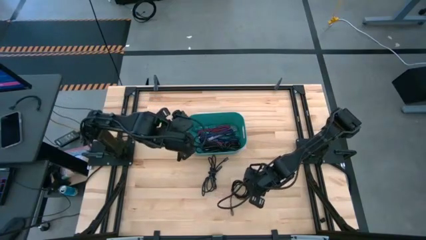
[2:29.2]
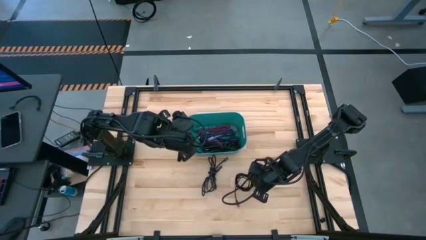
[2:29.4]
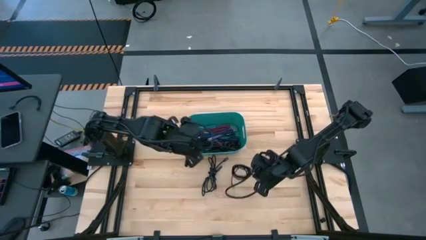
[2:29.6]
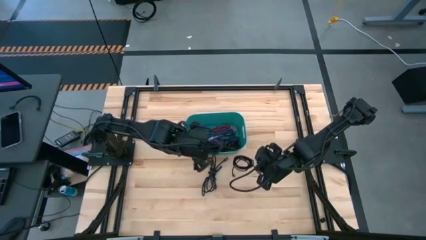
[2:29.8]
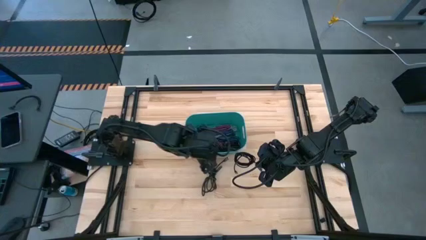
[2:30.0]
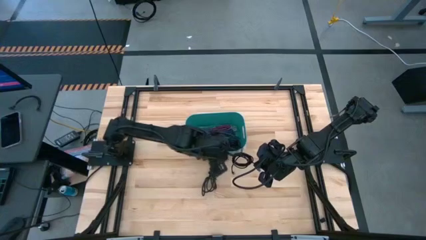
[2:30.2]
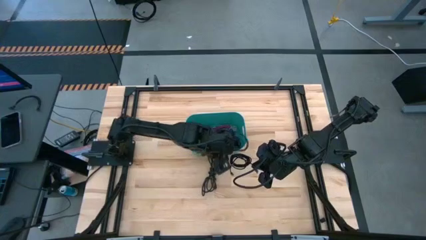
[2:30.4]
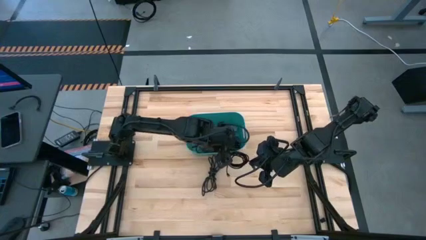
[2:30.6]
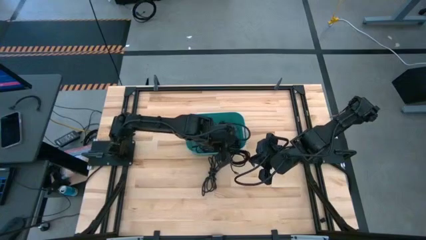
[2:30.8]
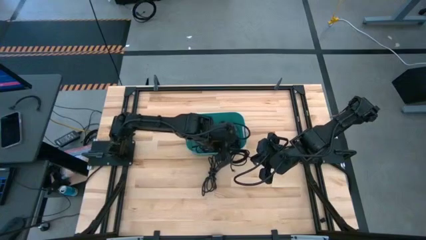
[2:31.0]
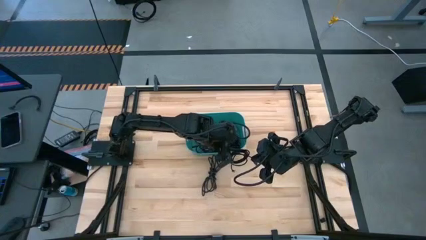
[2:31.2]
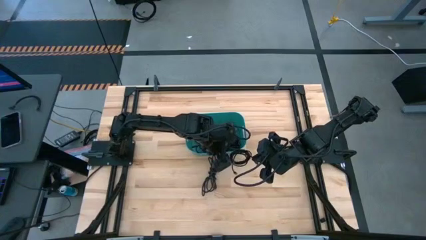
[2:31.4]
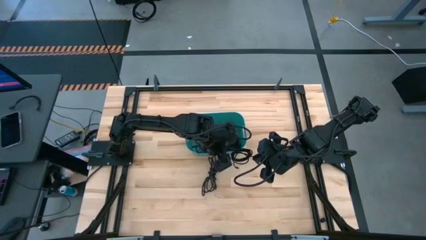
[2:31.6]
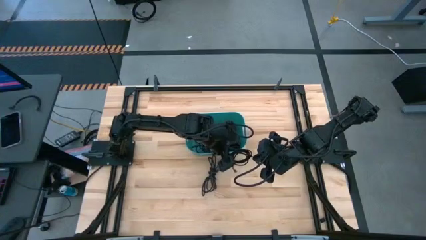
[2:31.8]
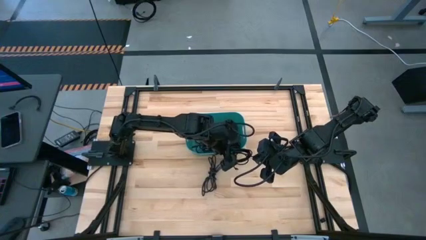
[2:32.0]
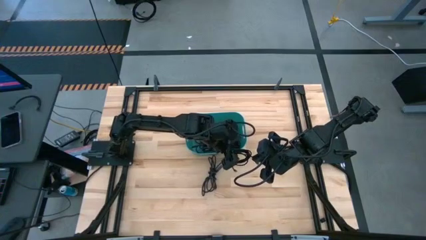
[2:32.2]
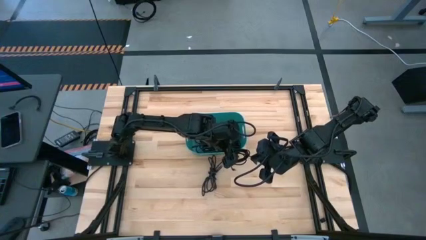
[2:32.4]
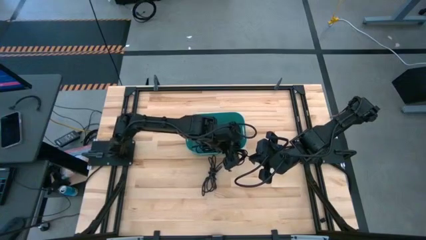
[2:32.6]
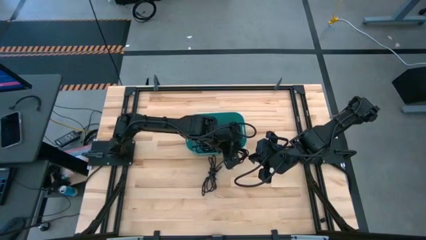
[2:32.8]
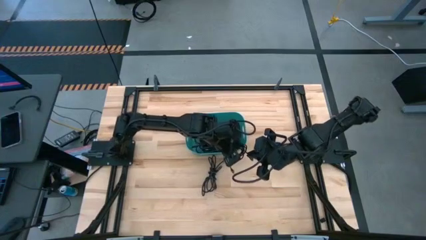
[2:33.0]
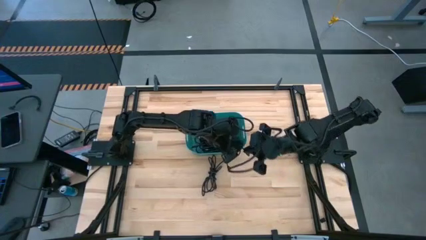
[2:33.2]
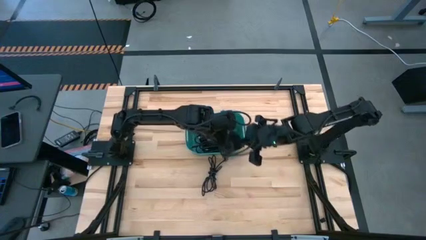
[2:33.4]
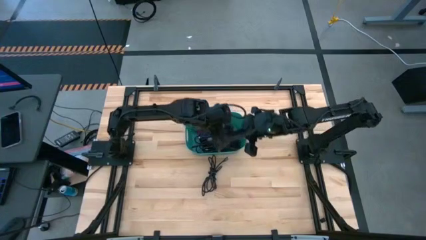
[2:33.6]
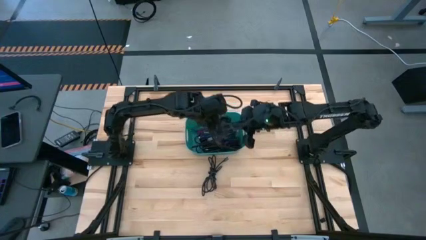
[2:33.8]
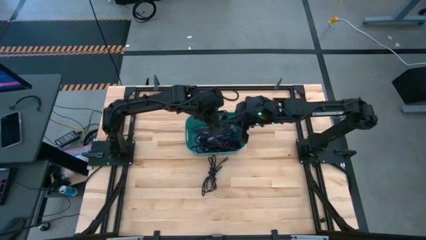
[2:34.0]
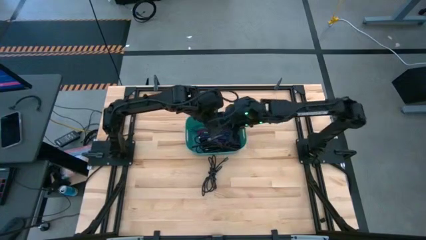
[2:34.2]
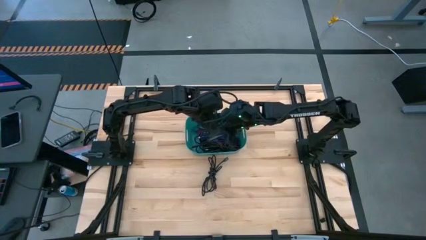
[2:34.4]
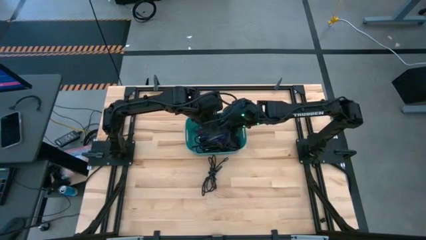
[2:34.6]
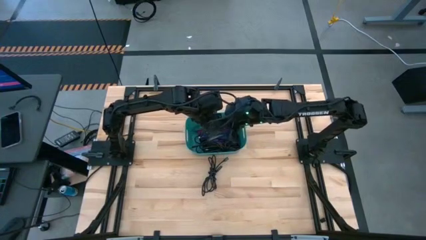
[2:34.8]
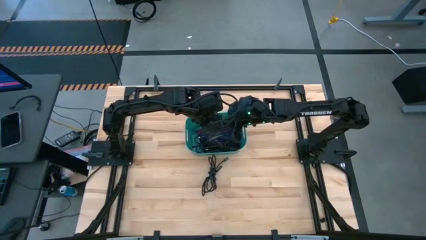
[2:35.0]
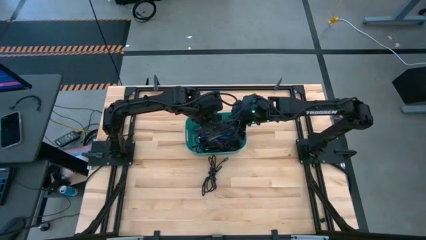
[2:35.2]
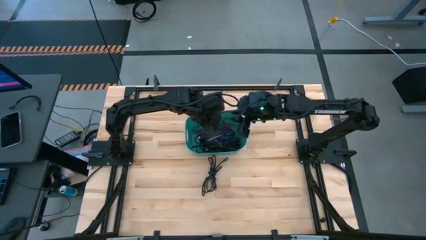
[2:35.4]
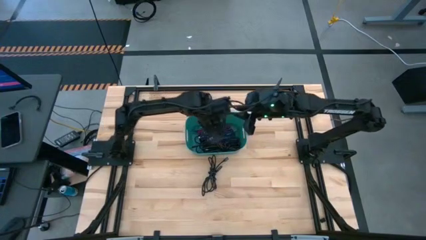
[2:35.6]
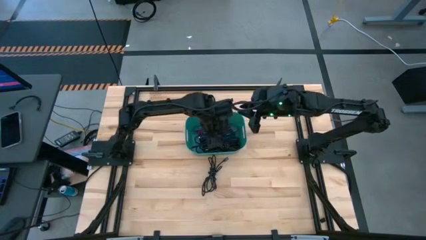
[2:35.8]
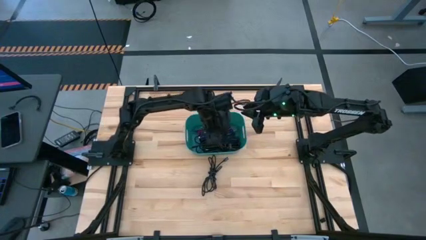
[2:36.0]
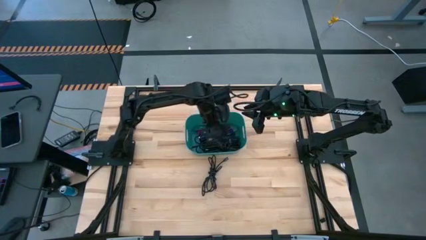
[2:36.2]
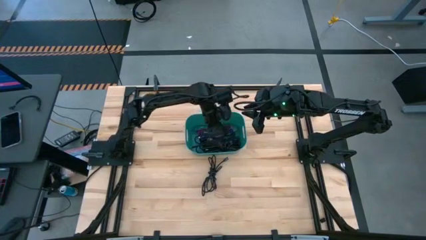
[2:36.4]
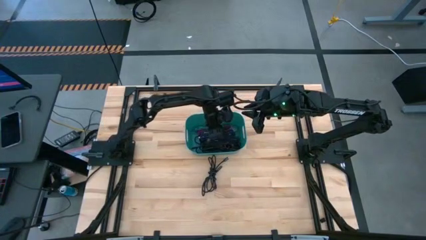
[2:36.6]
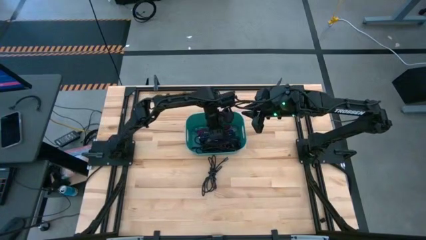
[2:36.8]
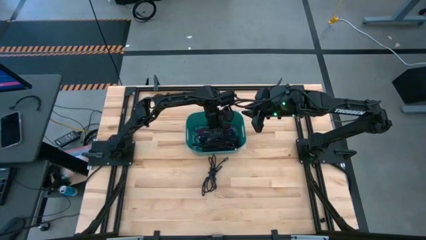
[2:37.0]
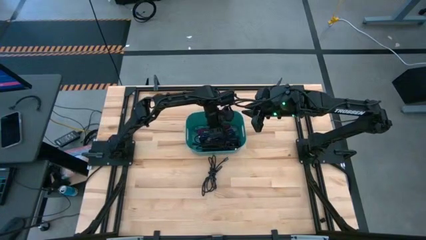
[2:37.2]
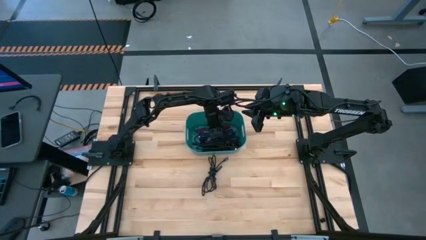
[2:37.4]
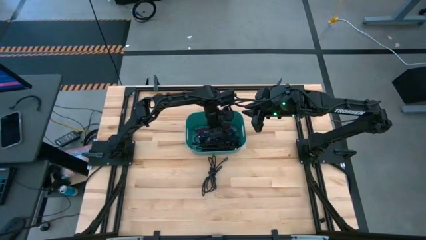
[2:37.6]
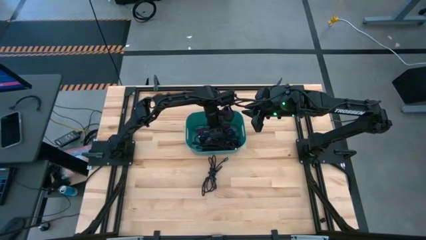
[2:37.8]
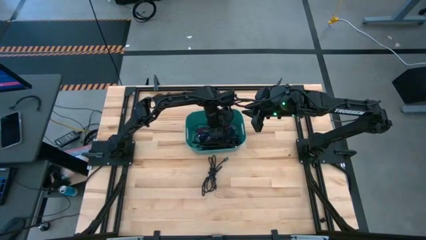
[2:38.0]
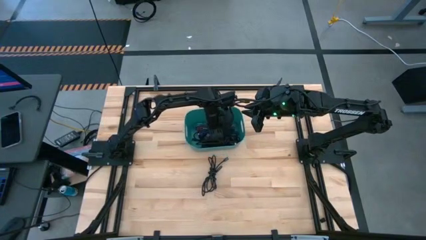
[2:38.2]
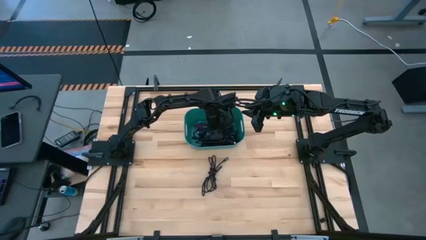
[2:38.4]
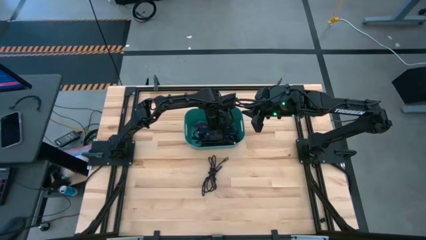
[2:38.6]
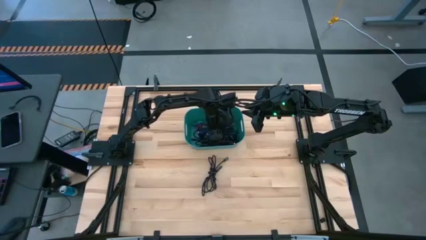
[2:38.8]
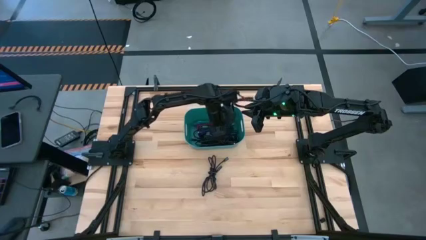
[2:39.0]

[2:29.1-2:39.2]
Task: Pick and place USB-C Cables
Put the bottom black charger cable into the light blue bin

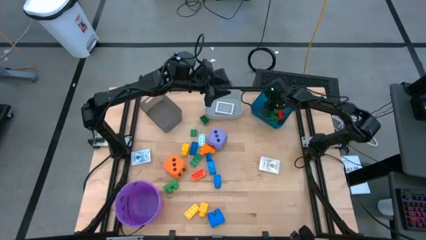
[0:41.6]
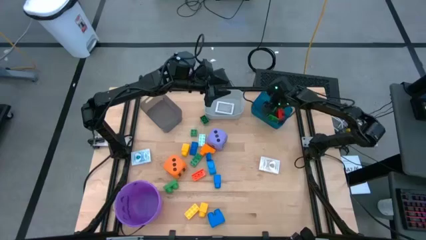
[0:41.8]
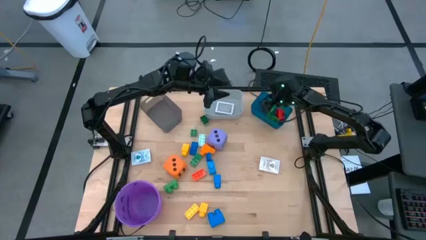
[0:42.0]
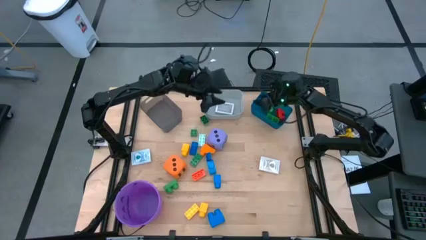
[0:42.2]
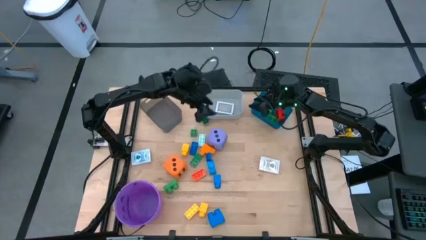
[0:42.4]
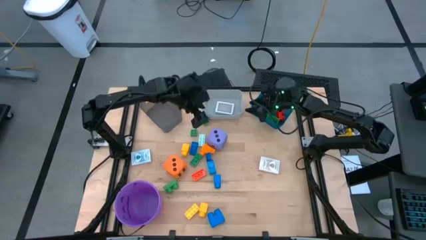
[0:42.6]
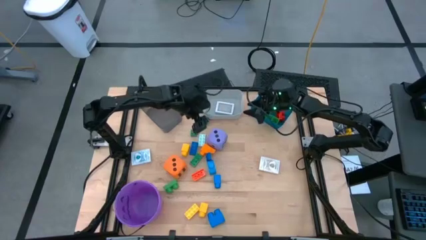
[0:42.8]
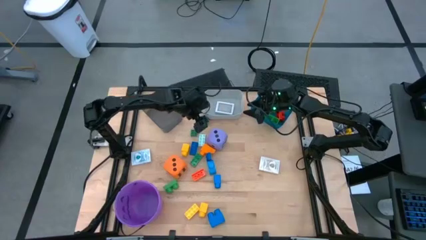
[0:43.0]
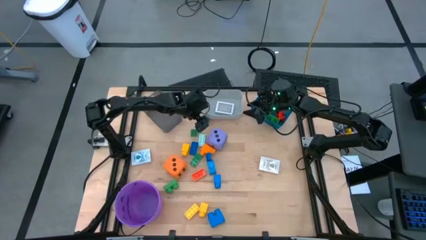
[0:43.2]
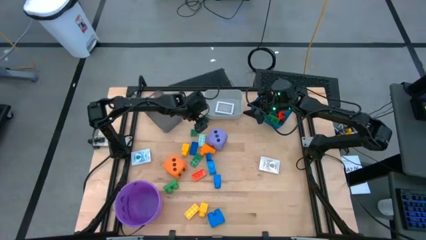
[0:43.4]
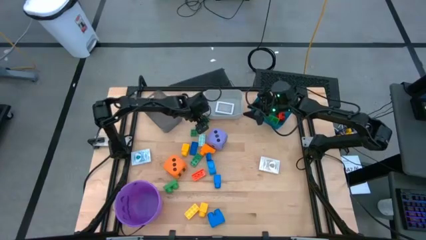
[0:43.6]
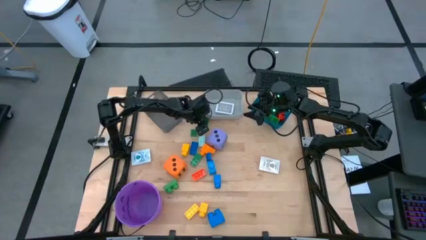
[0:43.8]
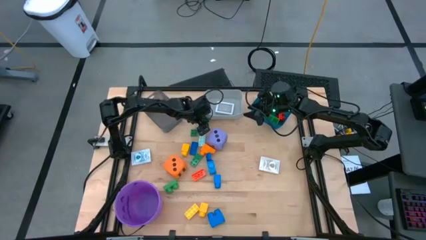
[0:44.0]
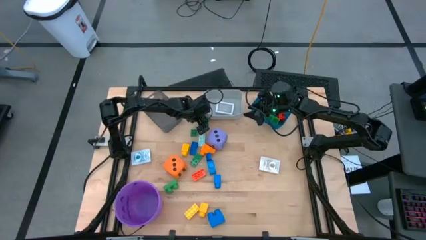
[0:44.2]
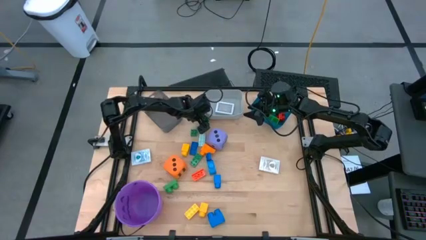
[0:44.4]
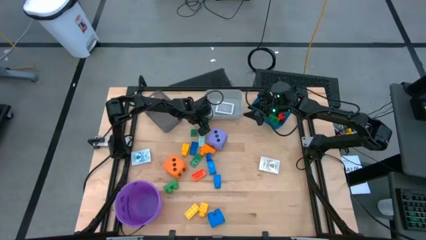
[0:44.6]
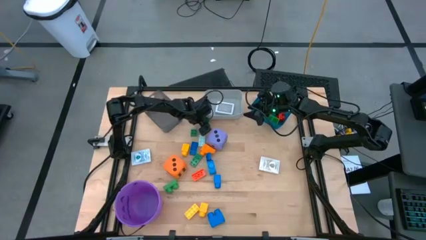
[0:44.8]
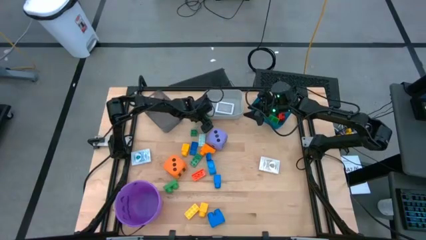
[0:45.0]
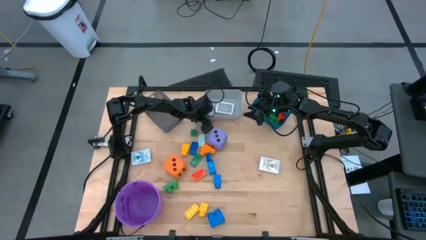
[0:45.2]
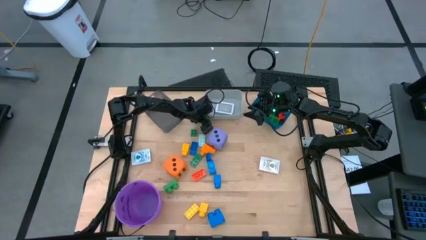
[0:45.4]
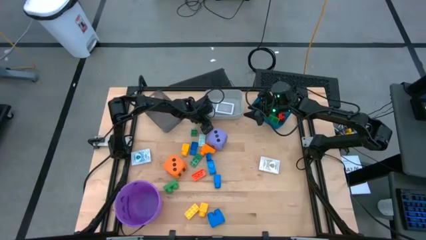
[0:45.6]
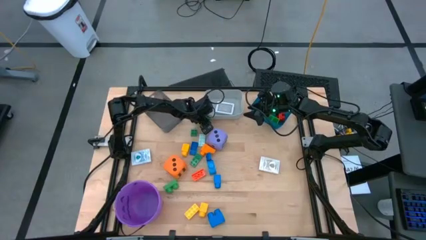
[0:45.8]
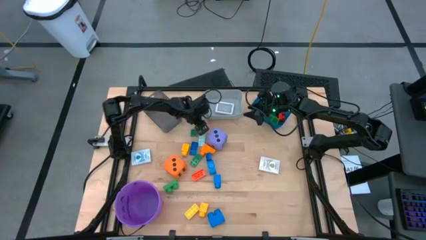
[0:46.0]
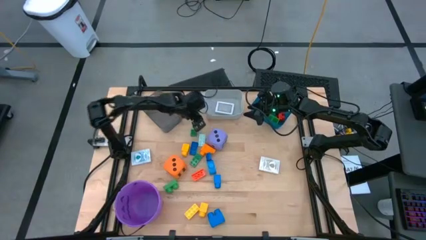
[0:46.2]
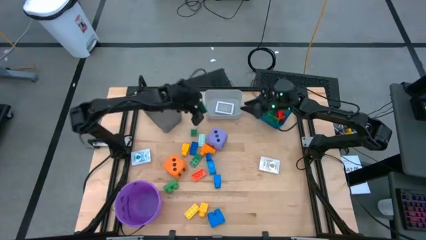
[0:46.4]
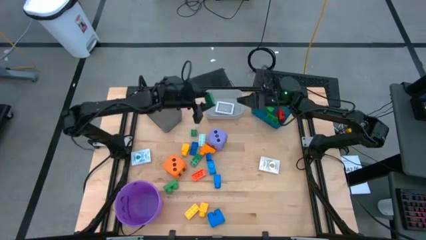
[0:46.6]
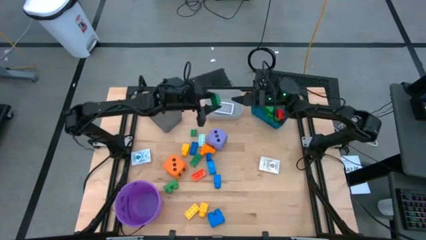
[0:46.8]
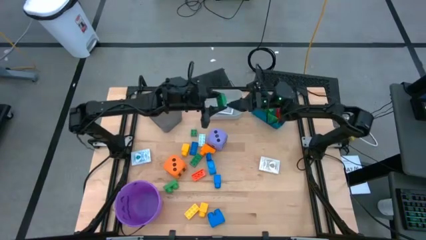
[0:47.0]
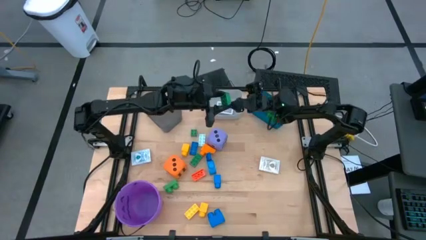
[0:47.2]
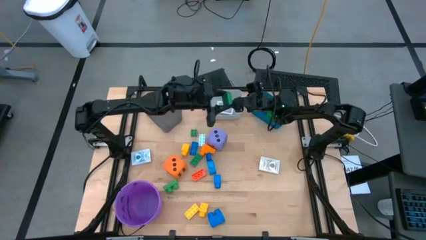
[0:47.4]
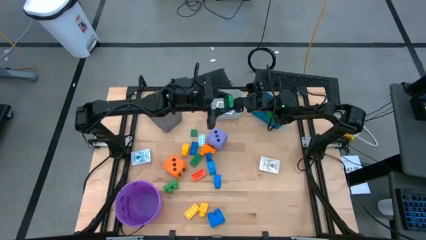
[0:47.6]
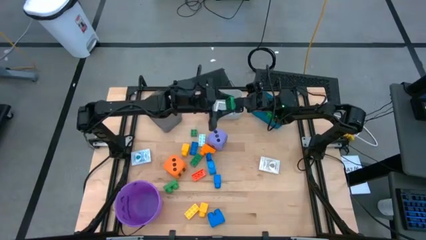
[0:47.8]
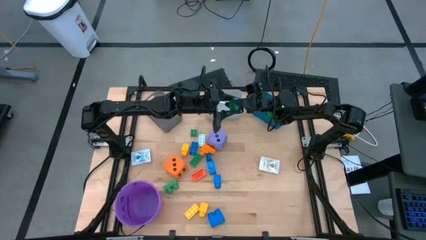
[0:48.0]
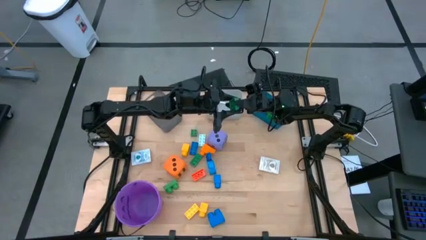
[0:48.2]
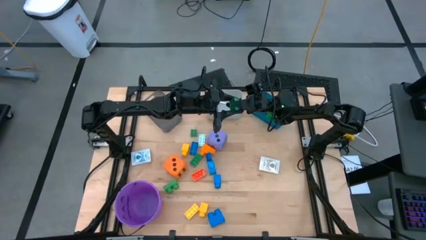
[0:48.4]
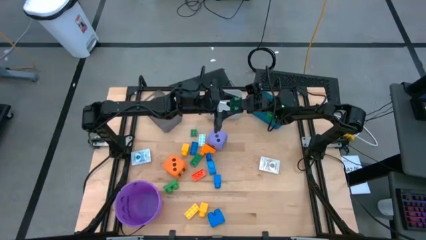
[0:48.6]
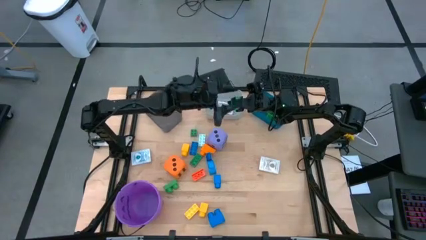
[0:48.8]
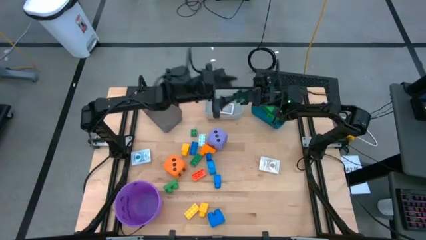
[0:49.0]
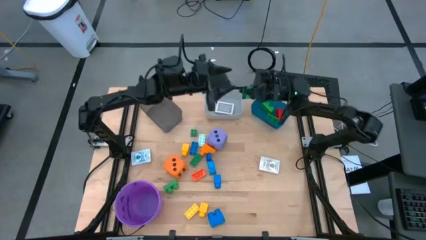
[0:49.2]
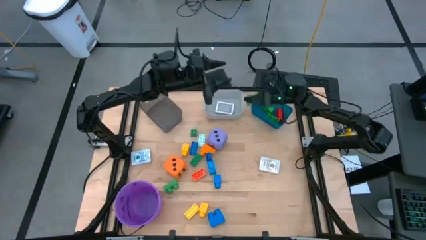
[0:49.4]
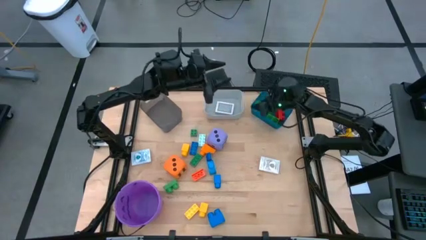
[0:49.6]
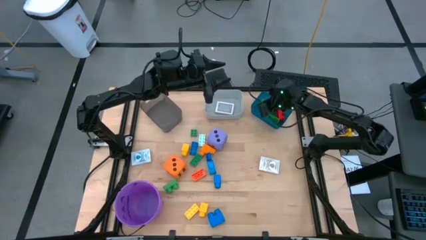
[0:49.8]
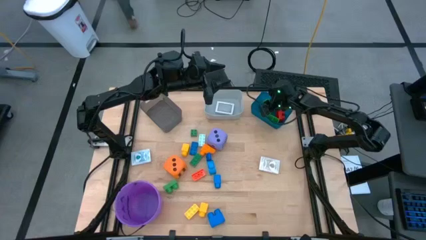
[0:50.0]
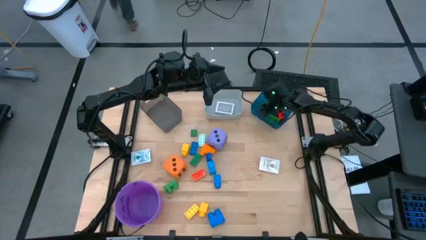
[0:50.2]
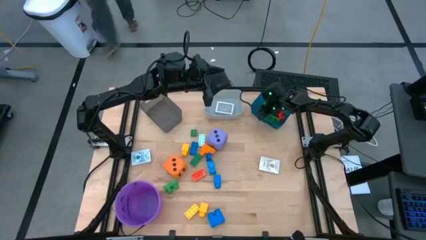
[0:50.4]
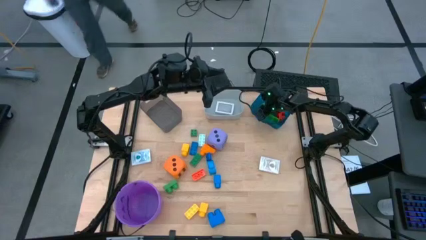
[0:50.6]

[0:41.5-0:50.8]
Task: Pick & Place Toys
Put the dark green game piece into the blue bin
